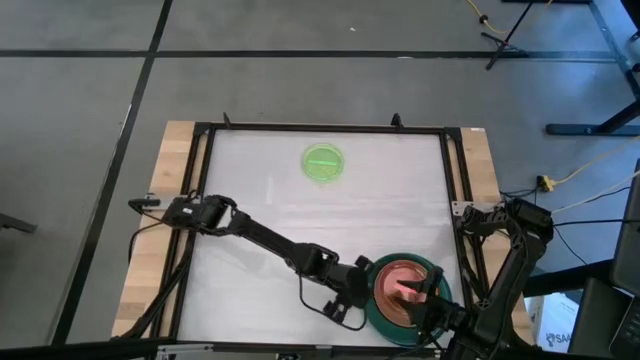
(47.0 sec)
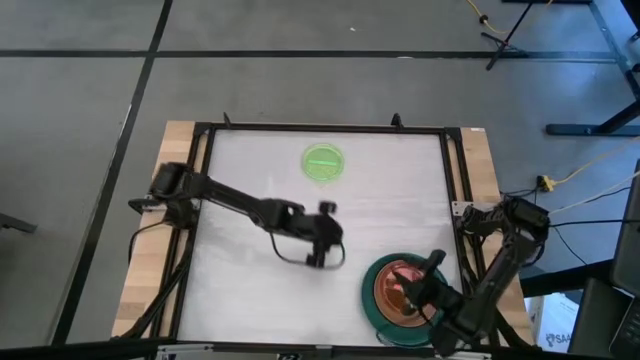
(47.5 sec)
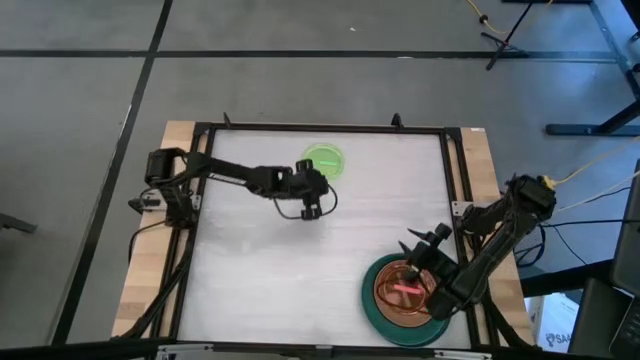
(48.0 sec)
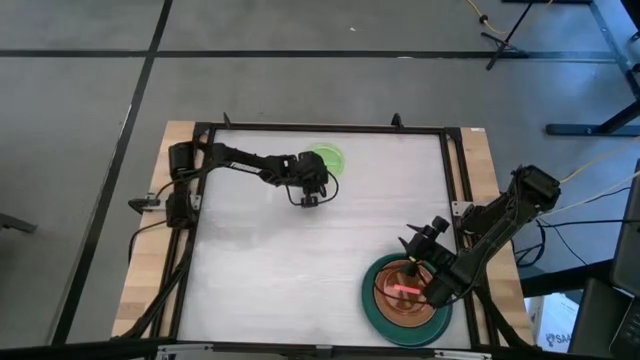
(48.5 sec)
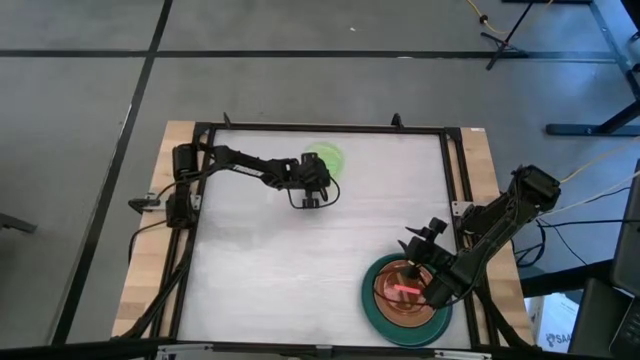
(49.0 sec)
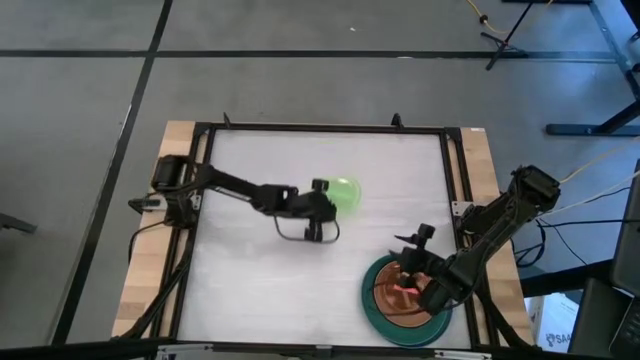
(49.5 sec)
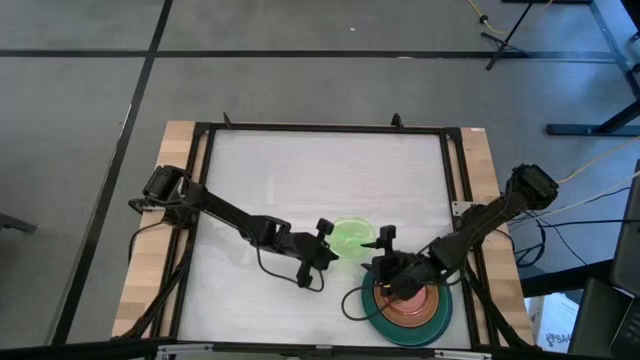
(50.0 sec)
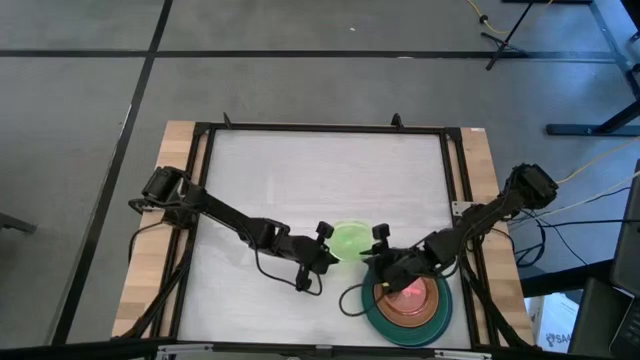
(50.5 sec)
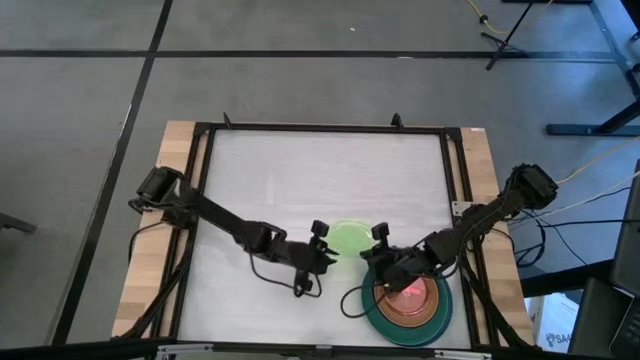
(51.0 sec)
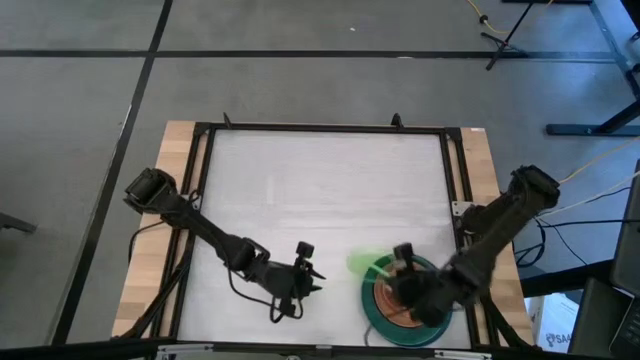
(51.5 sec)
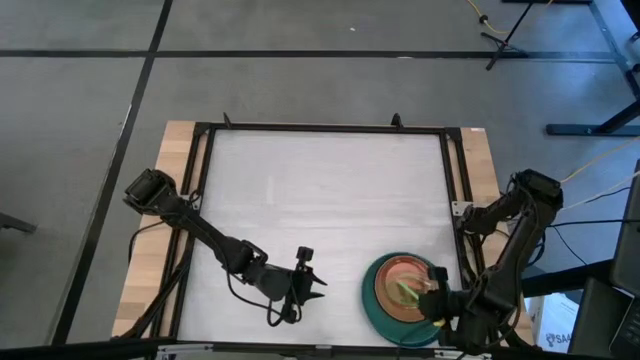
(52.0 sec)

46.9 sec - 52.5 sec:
Task: Stack plastic plates
Stack the green plate on top of the pink plate

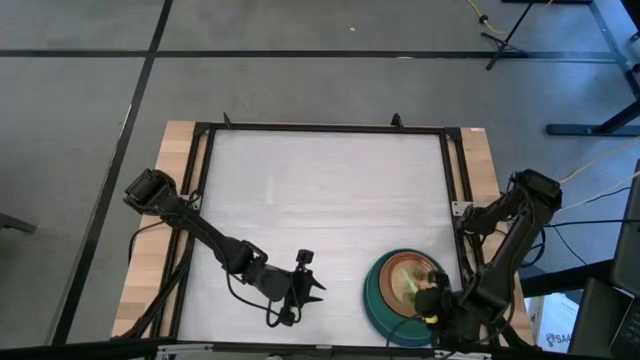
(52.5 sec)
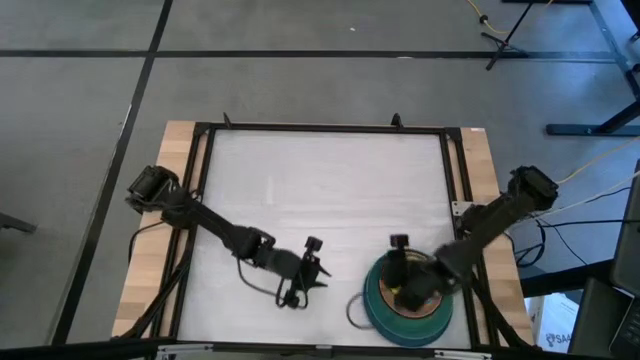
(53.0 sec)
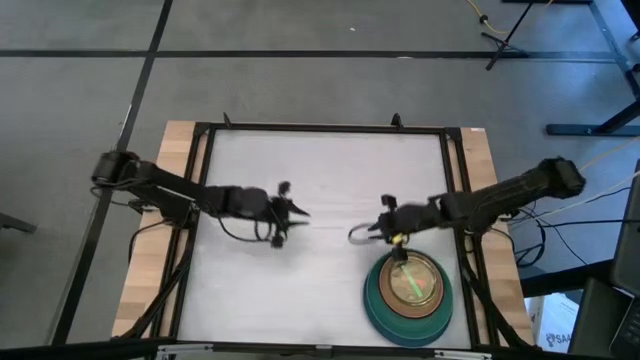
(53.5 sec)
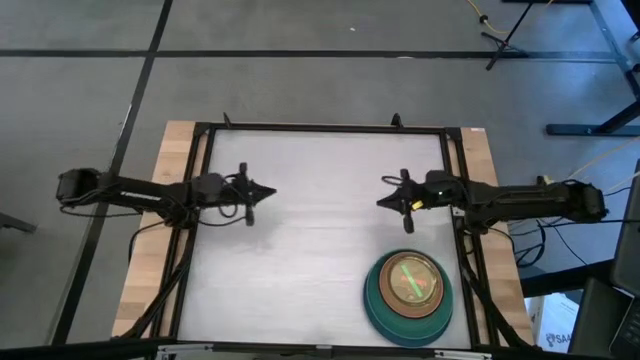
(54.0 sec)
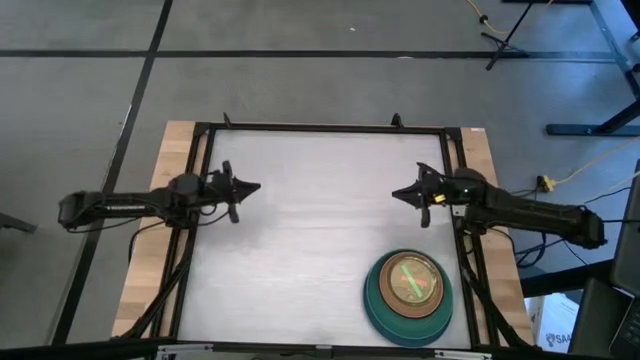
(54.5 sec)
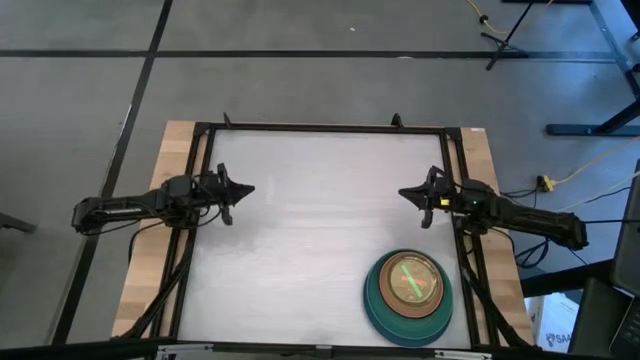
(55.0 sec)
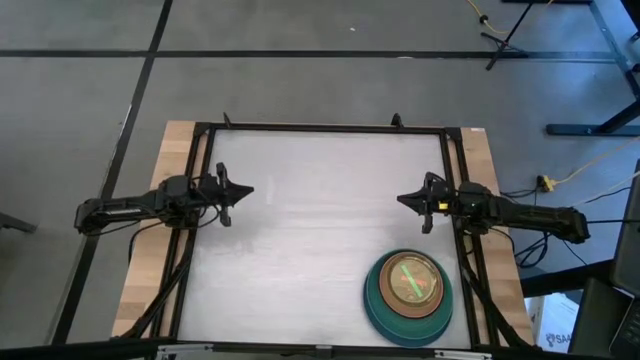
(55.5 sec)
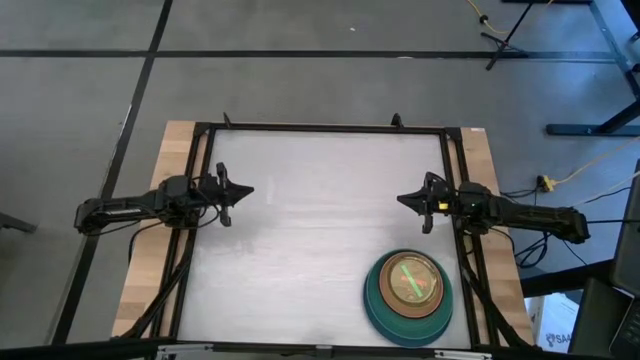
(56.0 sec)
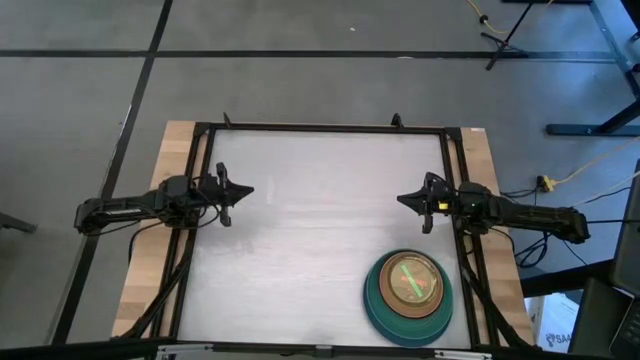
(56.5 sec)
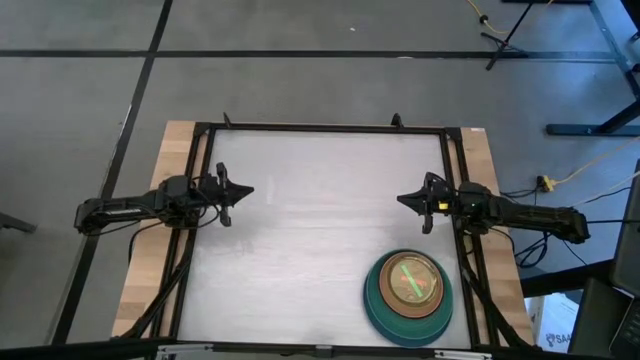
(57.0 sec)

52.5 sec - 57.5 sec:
Return to Home Position

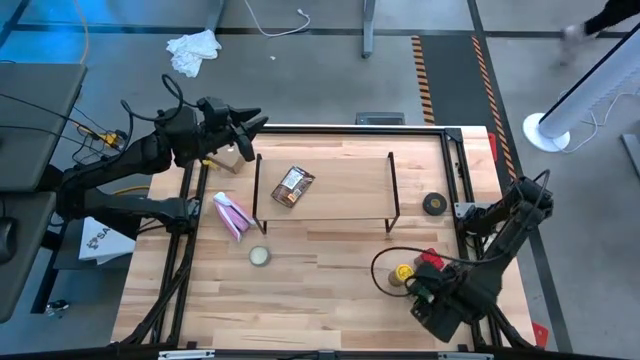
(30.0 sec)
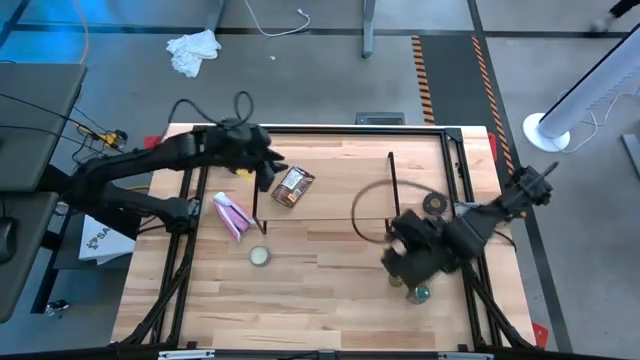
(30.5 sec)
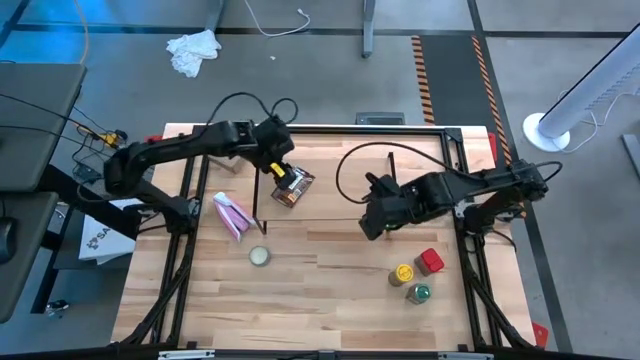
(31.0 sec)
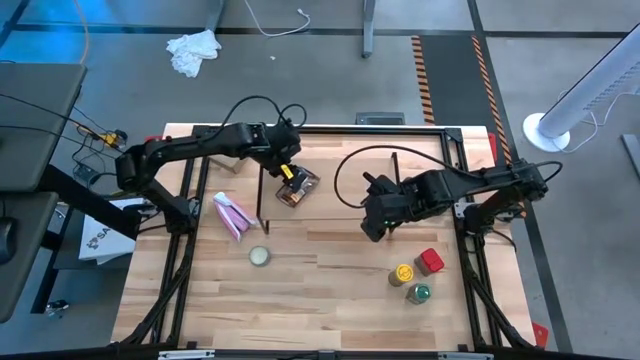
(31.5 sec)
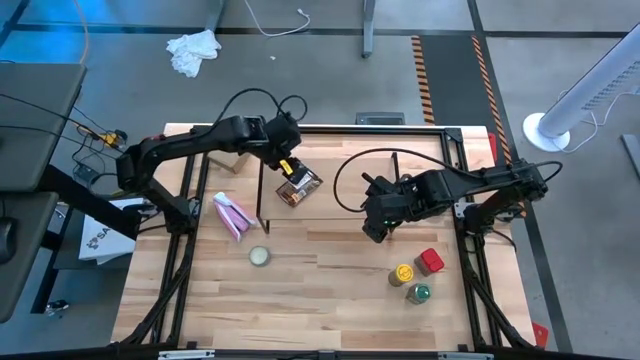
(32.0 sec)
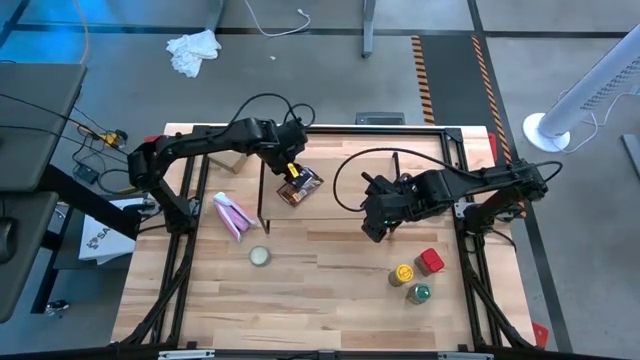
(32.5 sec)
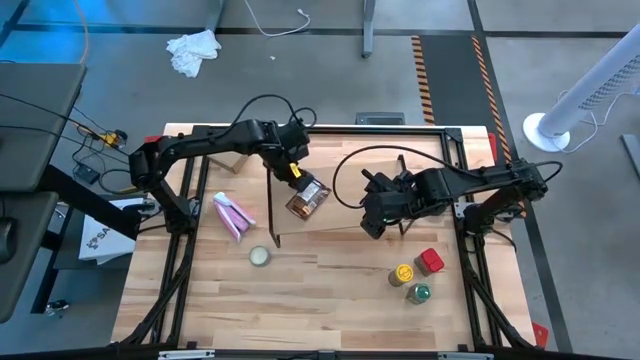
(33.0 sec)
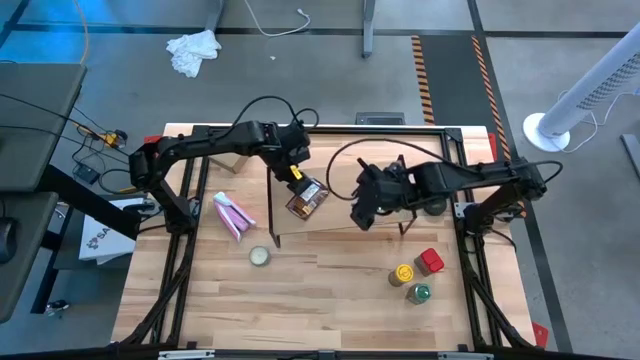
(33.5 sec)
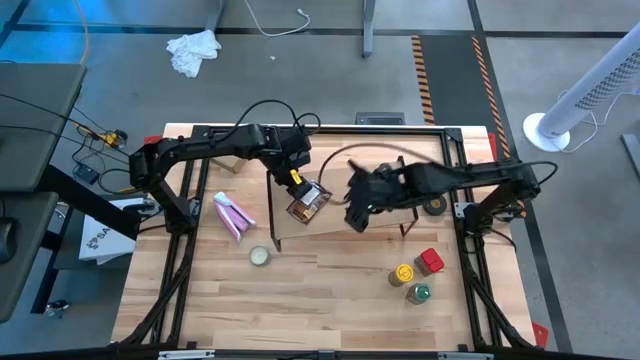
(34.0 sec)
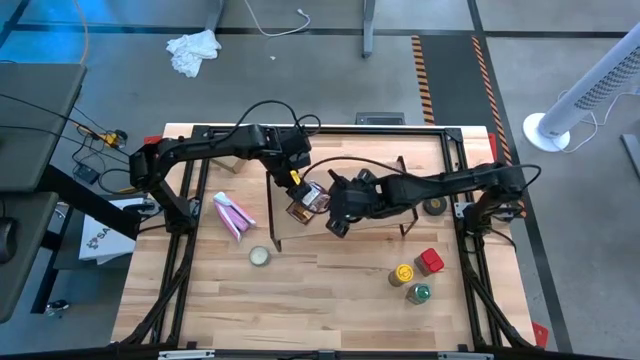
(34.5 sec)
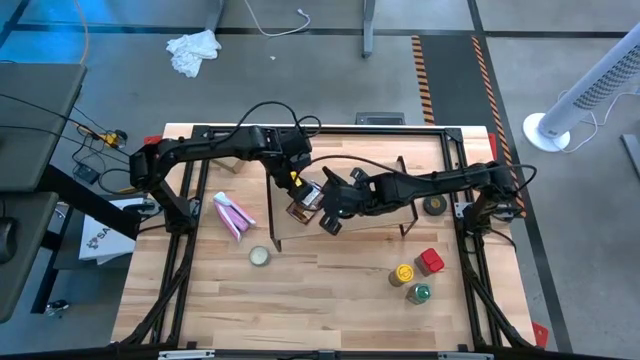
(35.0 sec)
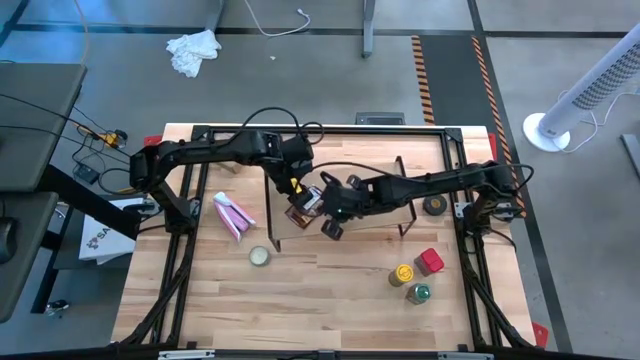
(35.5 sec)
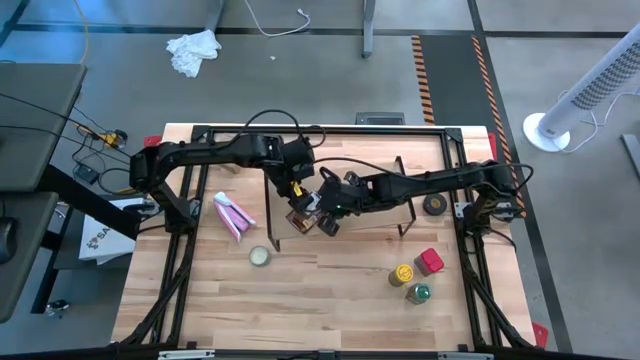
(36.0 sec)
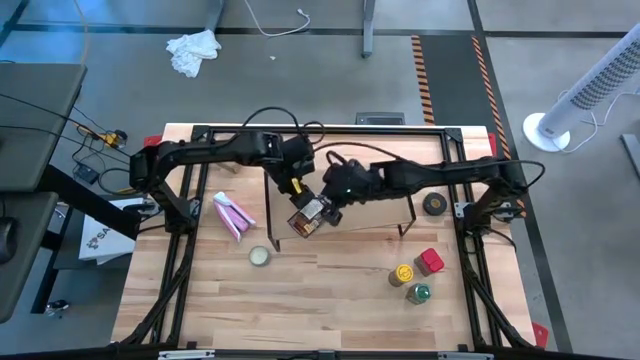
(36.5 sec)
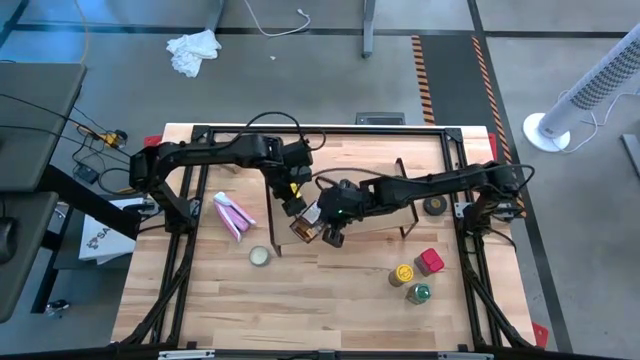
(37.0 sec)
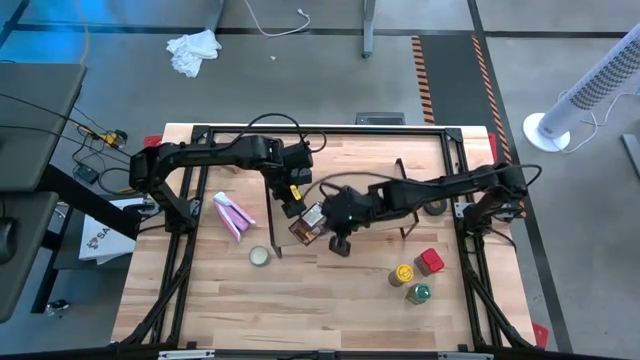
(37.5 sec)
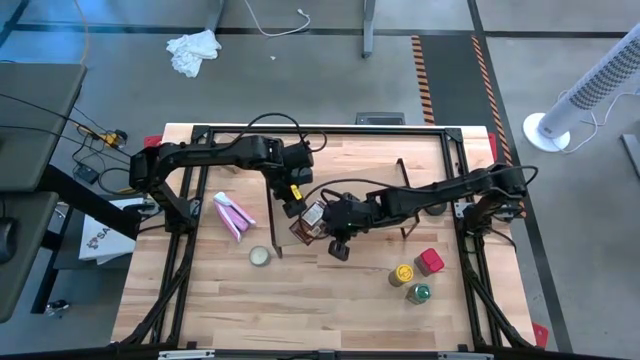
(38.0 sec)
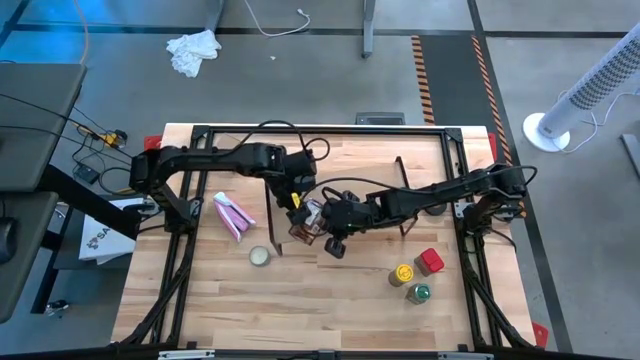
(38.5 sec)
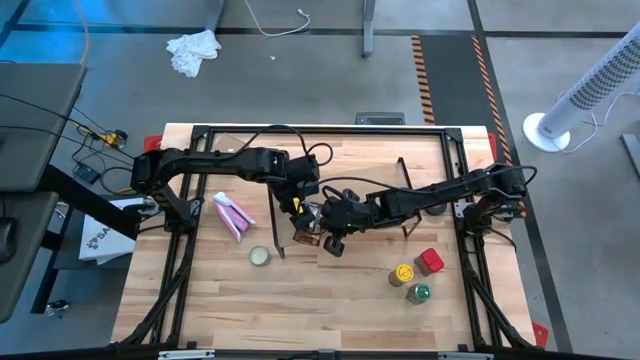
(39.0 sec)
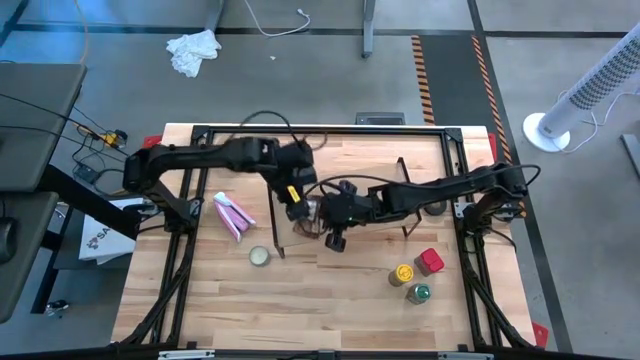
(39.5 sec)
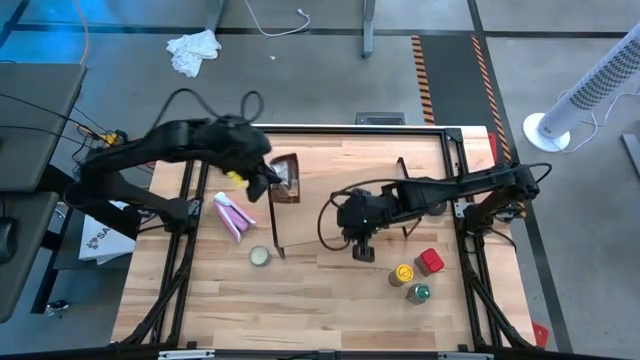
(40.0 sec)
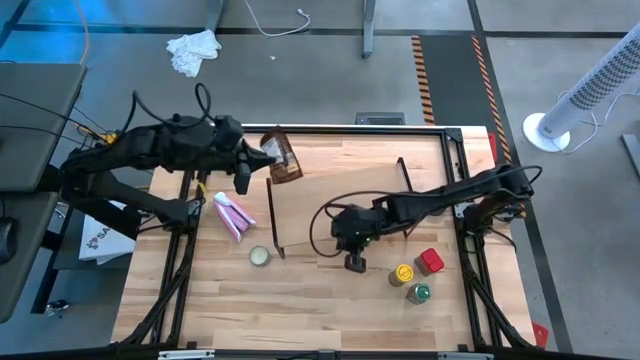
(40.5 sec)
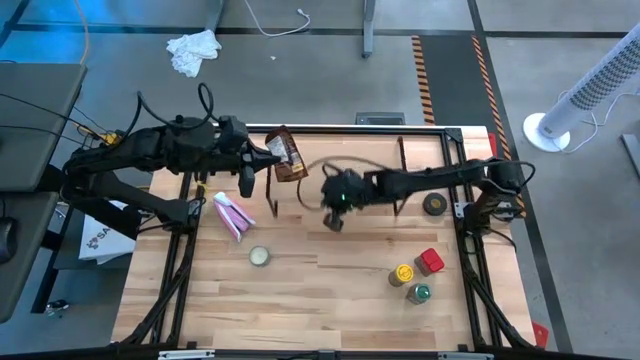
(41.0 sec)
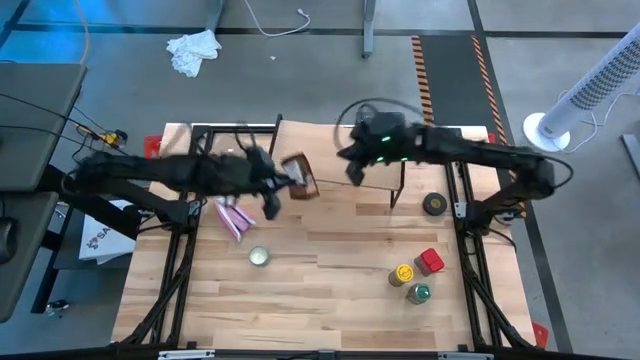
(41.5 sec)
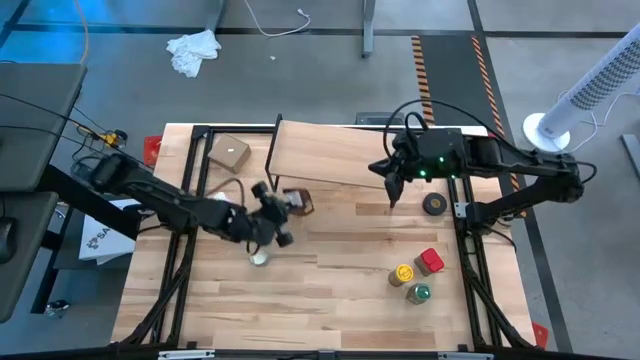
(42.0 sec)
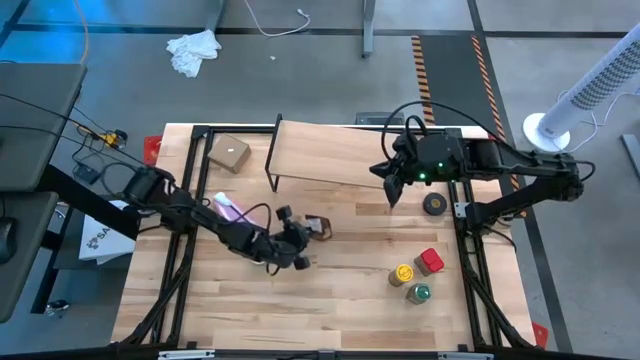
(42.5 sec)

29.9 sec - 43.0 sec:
Task: Shelf spices
Remove the orange spice pack from the shelf
